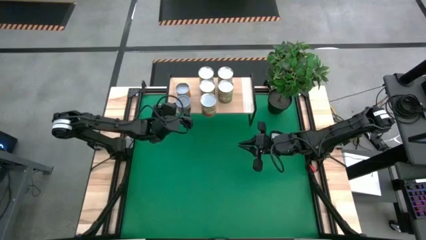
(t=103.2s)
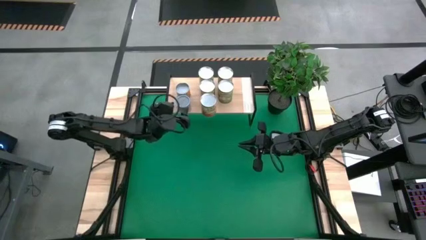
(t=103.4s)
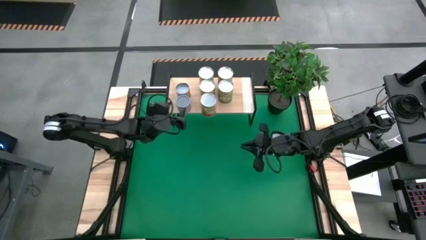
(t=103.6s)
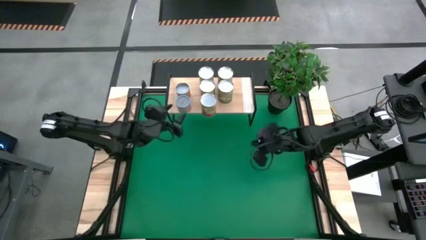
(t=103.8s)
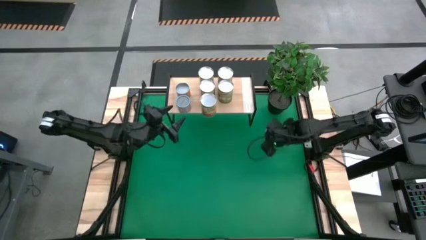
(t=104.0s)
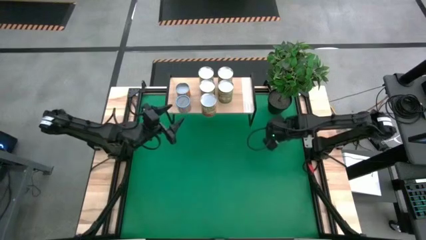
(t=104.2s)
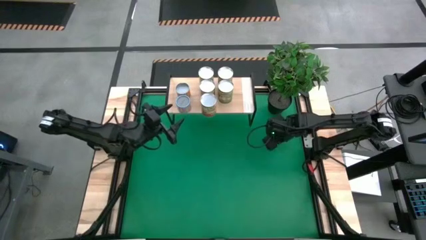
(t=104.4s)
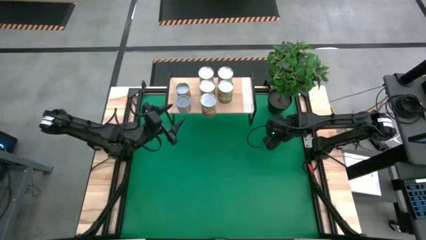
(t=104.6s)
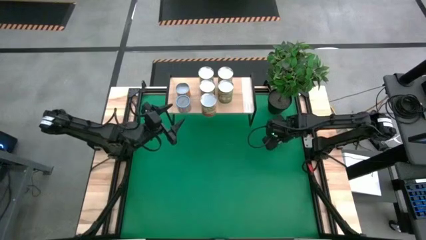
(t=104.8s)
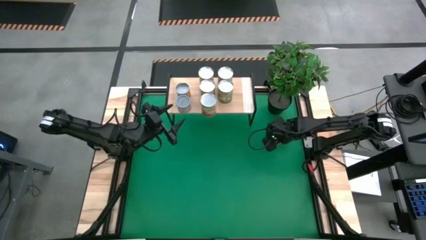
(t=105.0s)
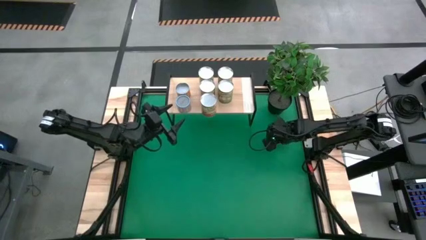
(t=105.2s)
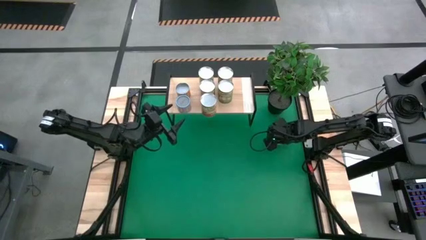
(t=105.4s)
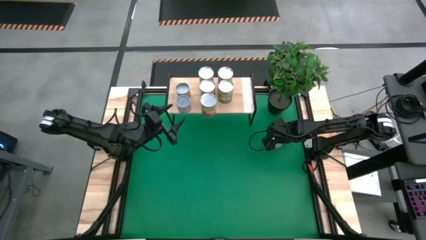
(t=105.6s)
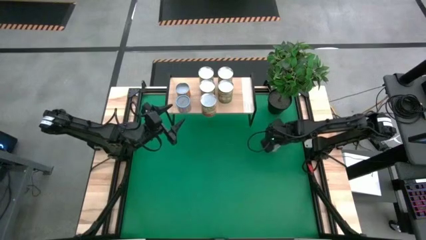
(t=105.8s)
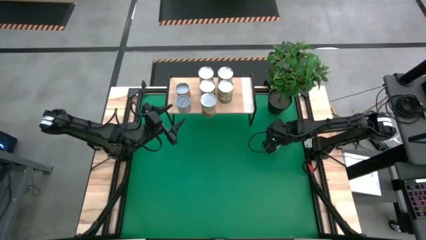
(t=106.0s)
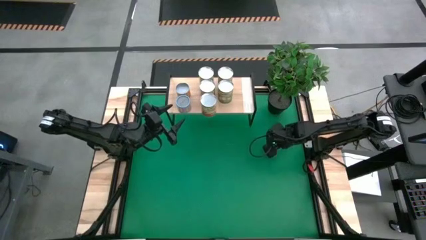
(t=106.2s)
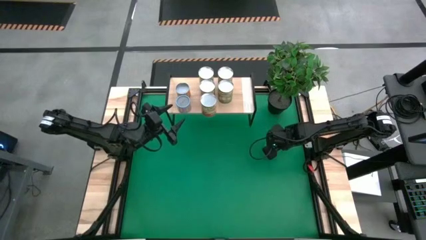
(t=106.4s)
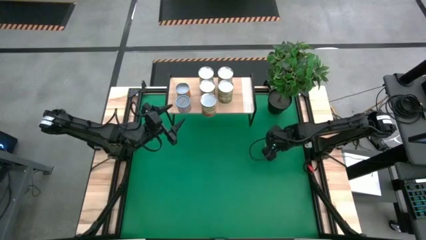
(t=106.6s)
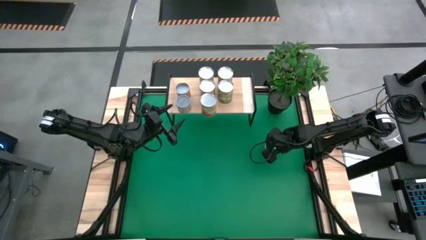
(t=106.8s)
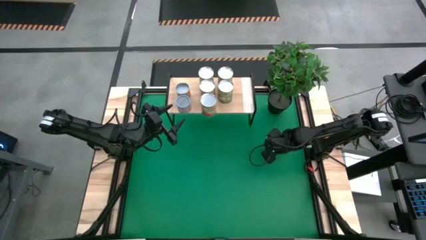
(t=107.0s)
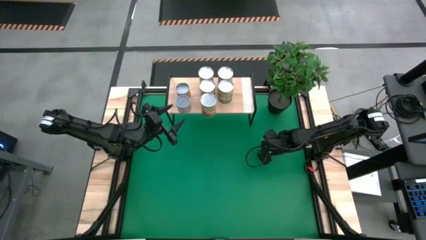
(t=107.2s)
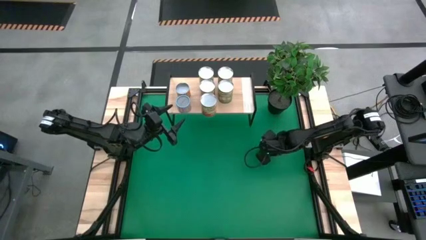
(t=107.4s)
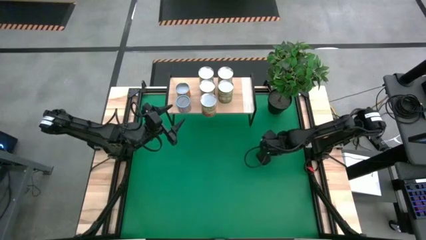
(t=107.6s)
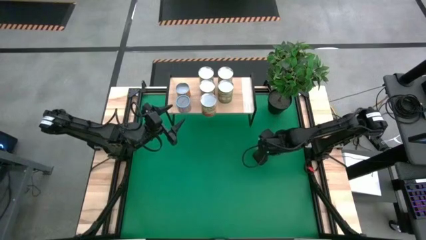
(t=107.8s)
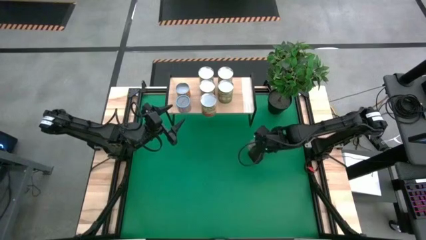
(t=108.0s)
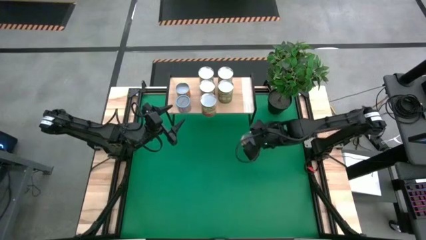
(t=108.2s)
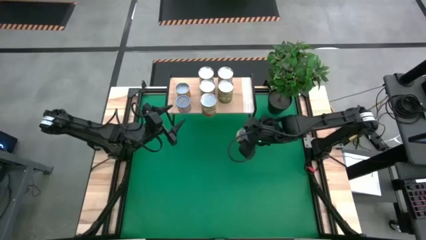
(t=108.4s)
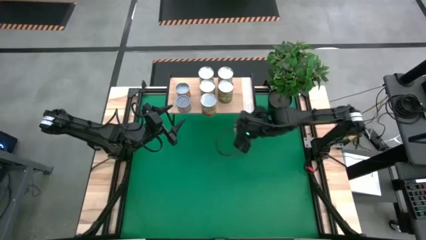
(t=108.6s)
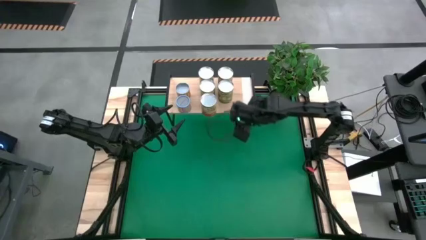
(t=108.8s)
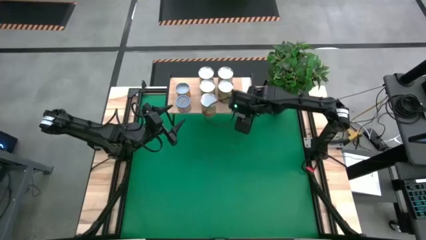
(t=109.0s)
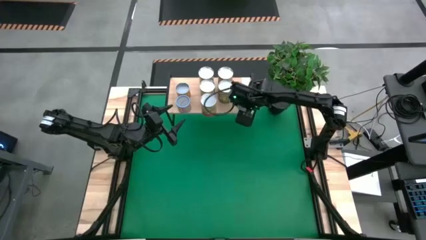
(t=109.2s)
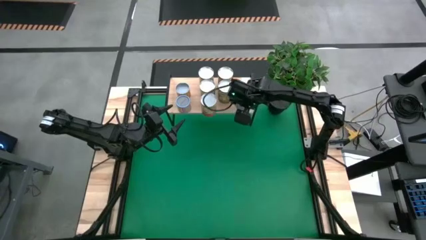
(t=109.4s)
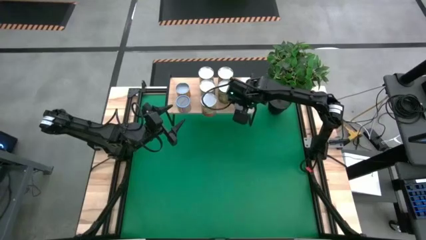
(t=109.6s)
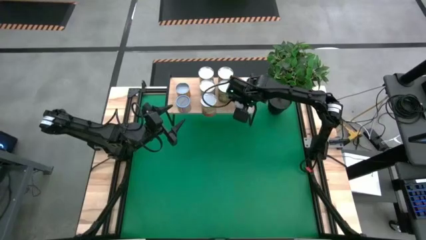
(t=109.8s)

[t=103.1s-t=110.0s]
Task: Pick and place cans onto a shelf
Put the canned mushroom on the shelf

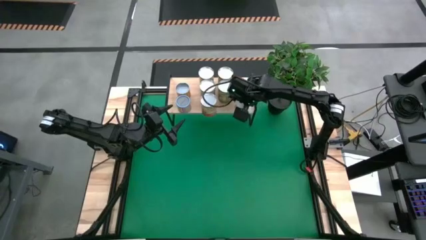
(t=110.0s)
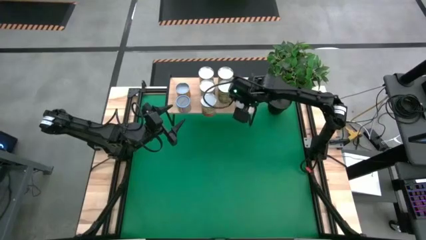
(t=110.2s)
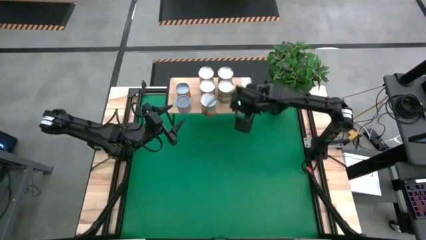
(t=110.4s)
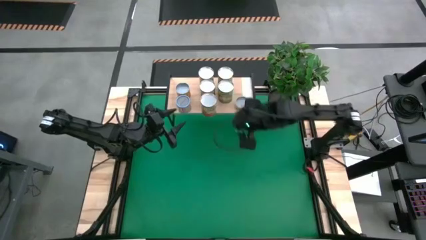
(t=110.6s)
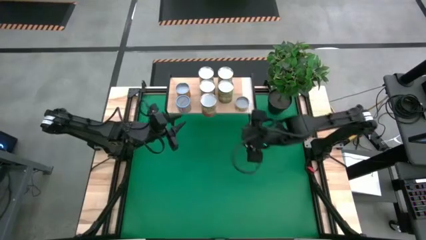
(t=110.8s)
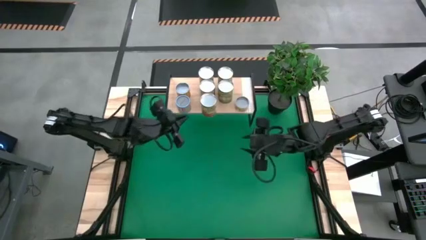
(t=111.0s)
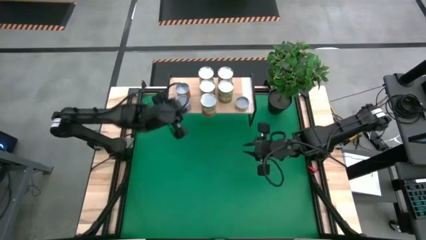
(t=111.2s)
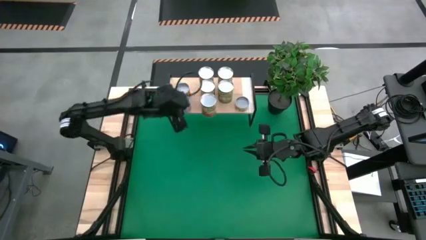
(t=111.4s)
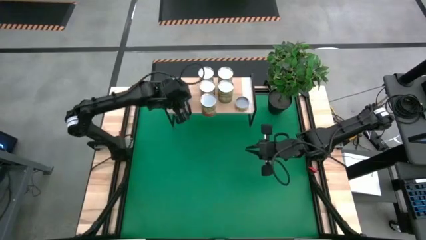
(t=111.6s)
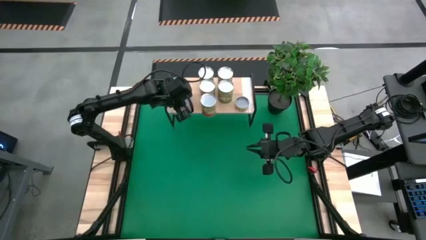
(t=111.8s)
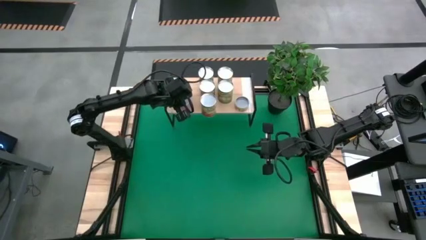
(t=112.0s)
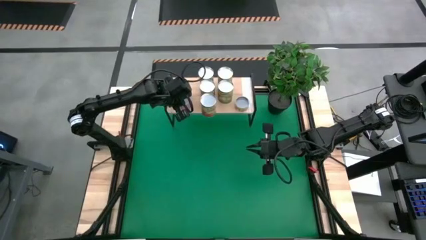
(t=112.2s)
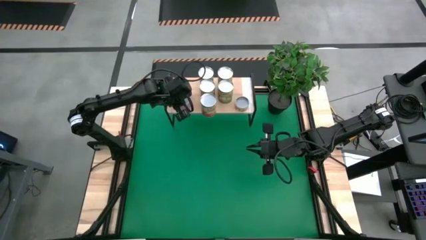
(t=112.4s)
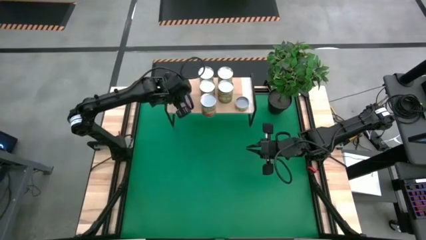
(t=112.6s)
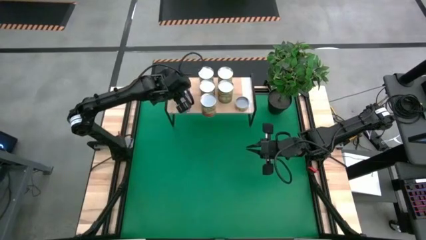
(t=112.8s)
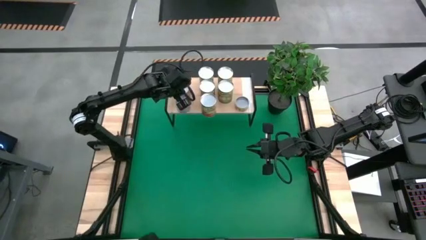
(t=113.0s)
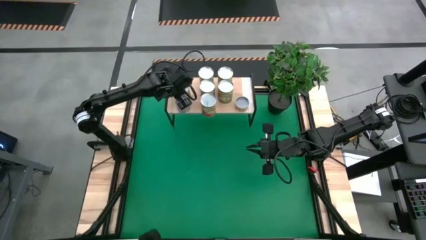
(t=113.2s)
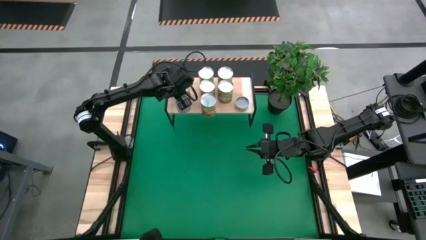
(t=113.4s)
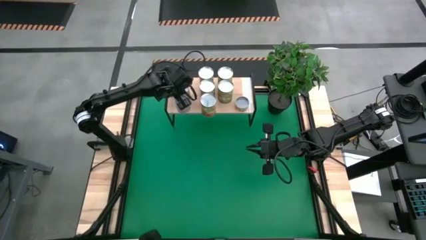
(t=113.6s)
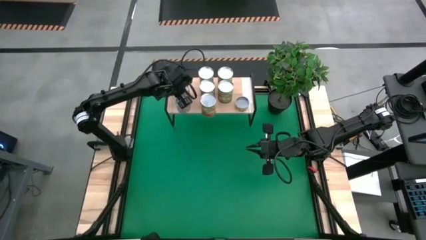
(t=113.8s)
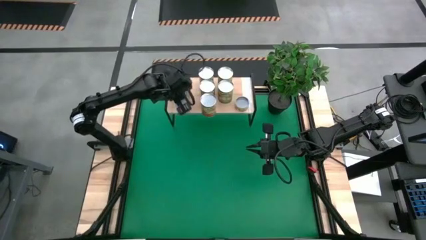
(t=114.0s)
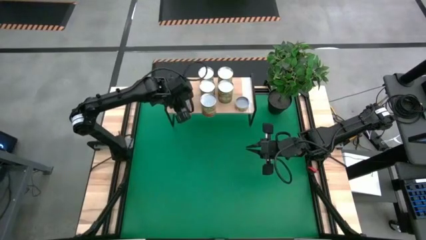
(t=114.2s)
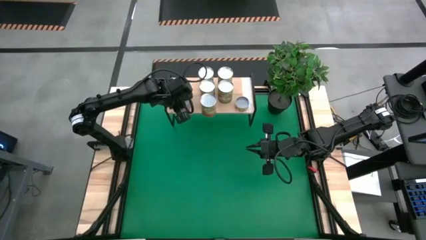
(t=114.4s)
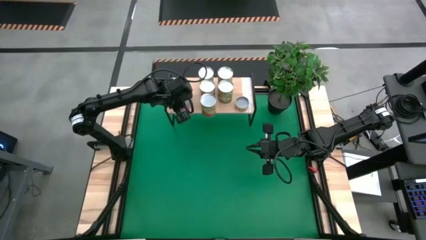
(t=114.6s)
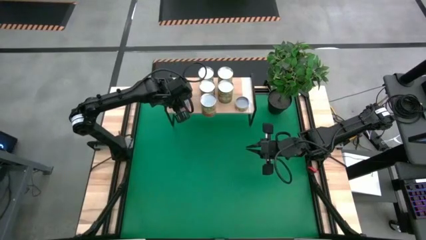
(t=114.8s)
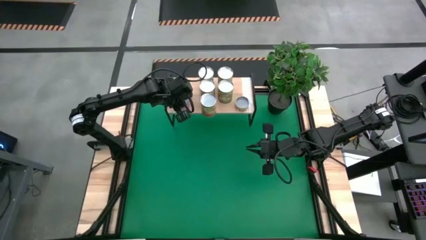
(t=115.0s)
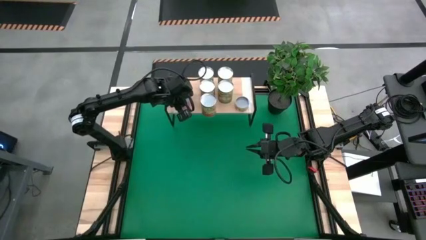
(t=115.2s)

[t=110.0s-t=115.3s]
Adjust the canned goods on the shelf
